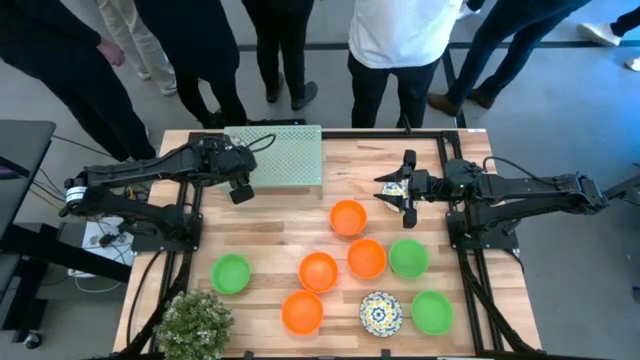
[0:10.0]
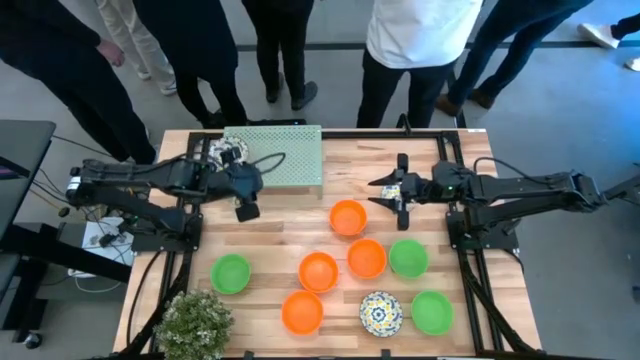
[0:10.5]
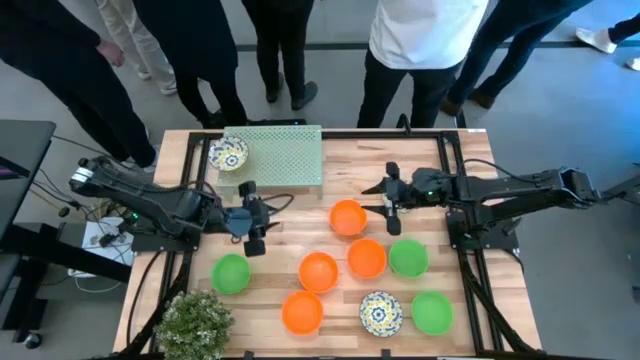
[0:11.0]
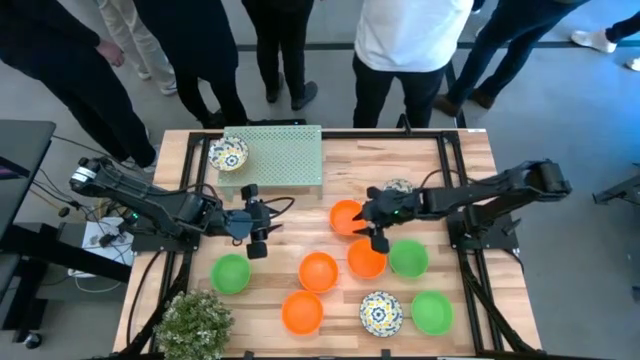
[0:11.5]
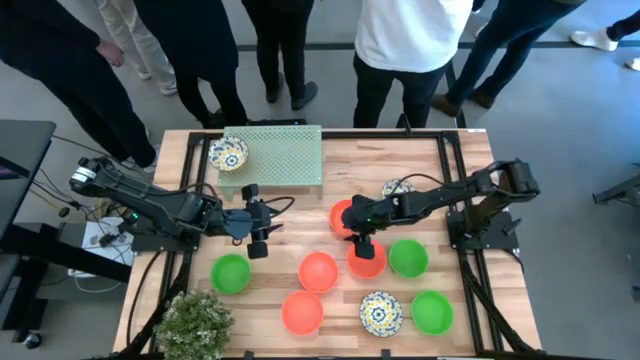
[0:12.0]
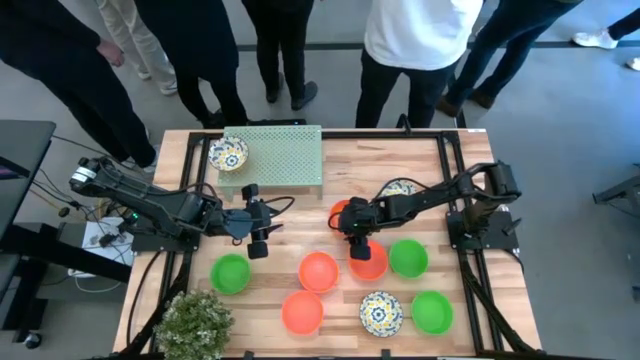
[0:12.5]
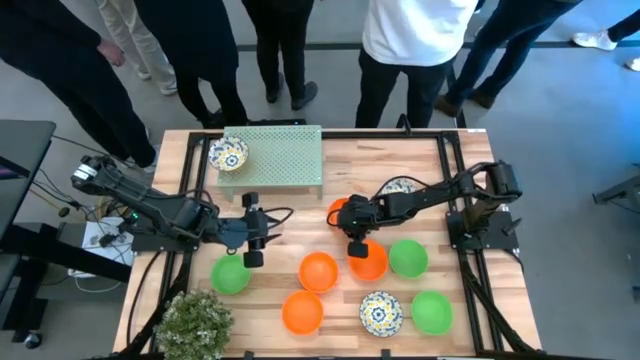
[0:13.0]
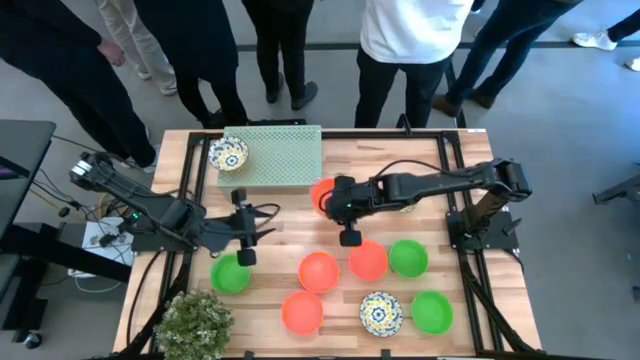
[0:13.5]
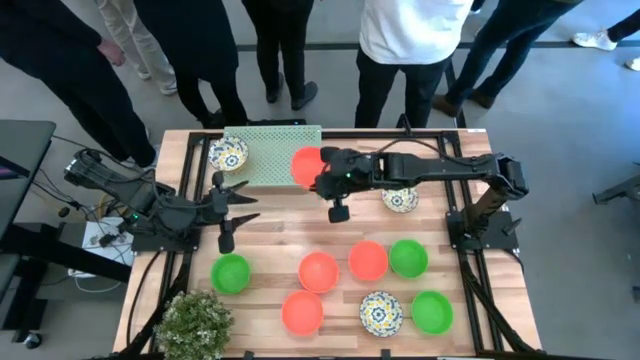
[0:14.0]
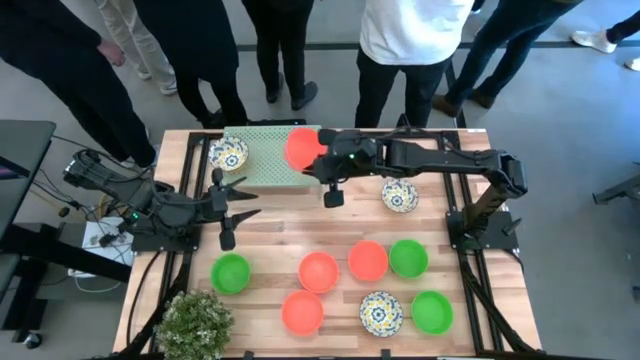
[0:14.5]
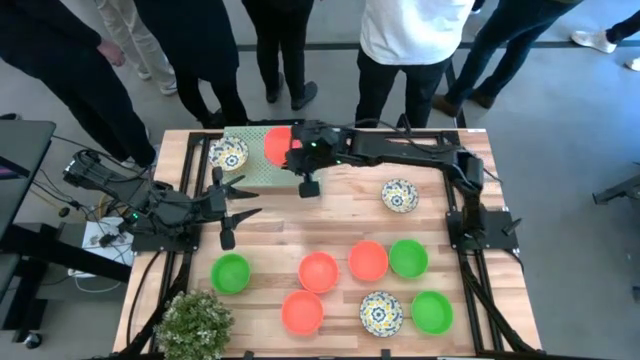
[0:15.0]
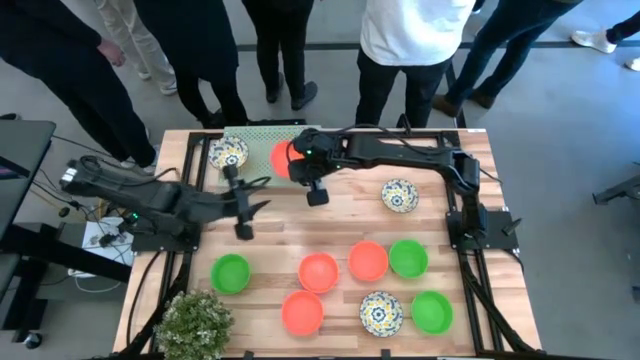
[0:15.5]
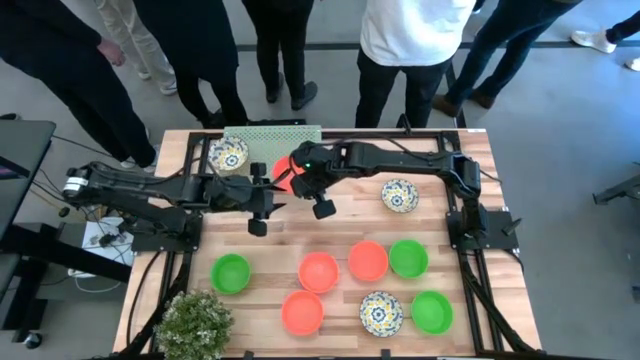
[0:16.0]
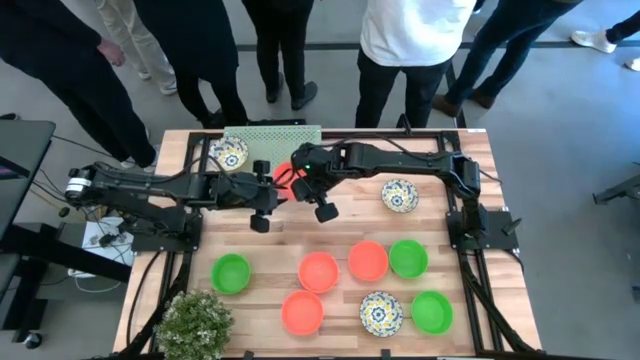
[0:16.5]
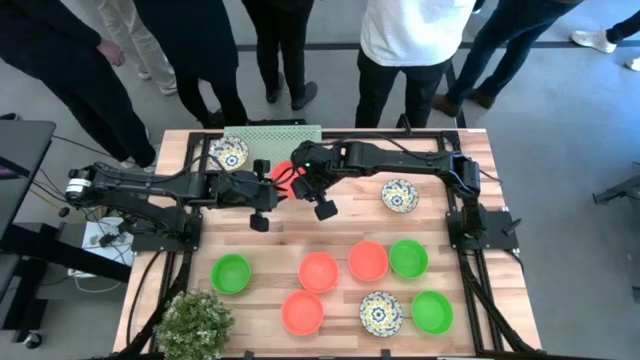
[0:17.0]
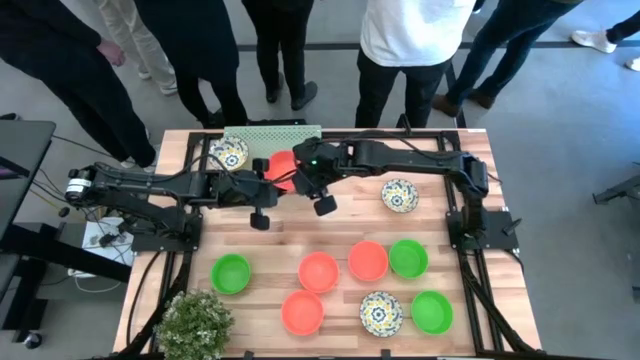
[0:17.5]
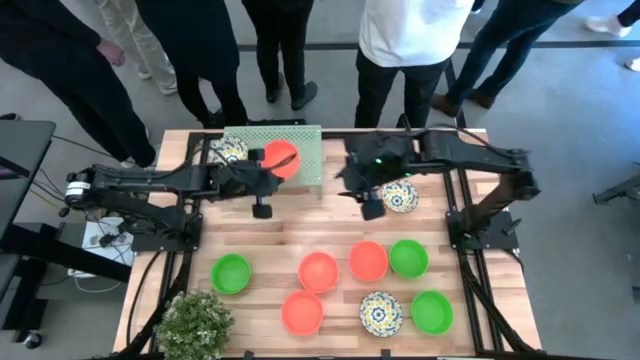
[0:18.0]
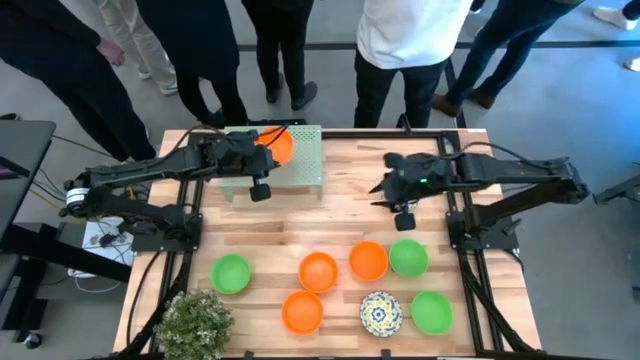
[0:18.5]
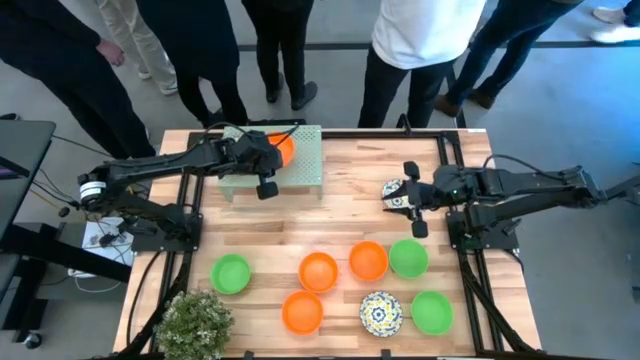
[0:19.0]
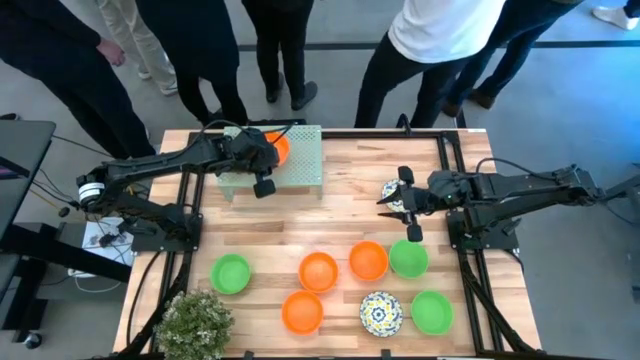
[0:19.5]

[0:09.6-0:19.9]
Task: Pick & Place Mini bowls
Put the orange bowl on the shelf

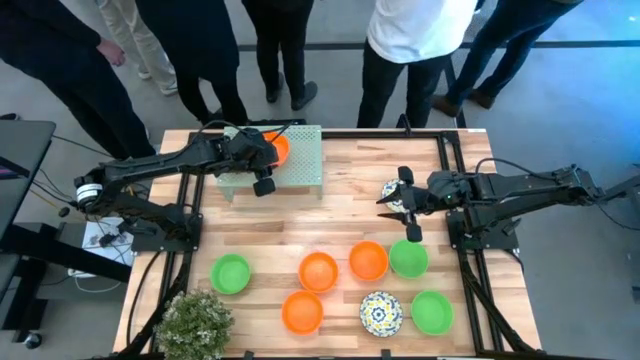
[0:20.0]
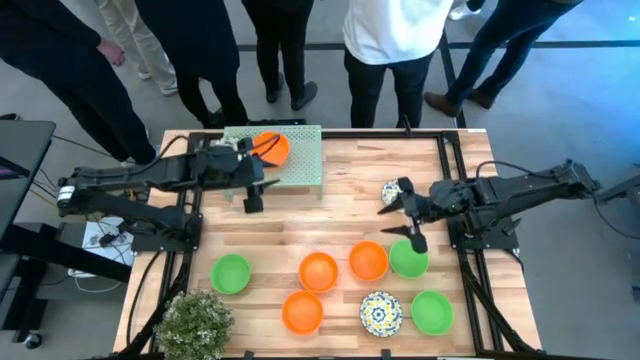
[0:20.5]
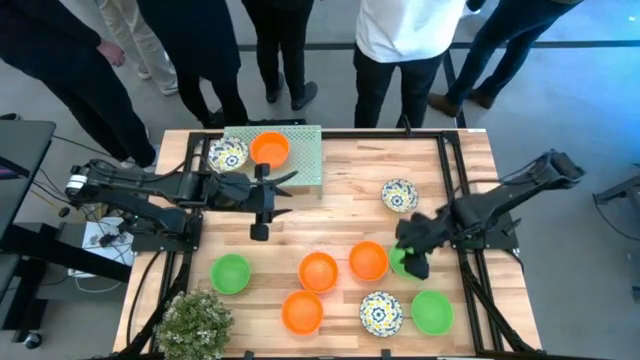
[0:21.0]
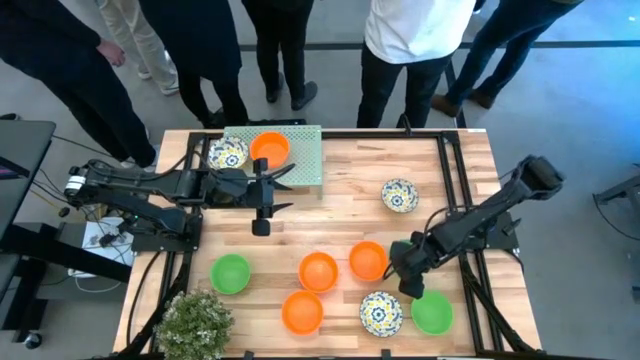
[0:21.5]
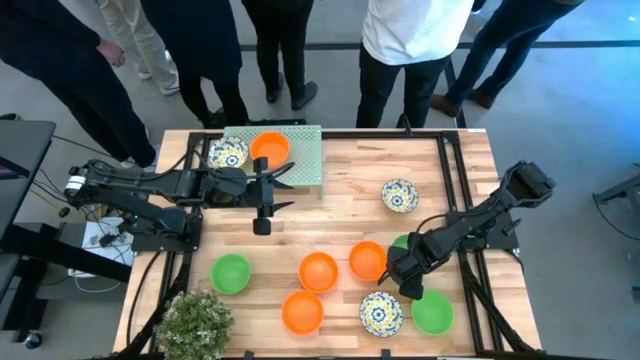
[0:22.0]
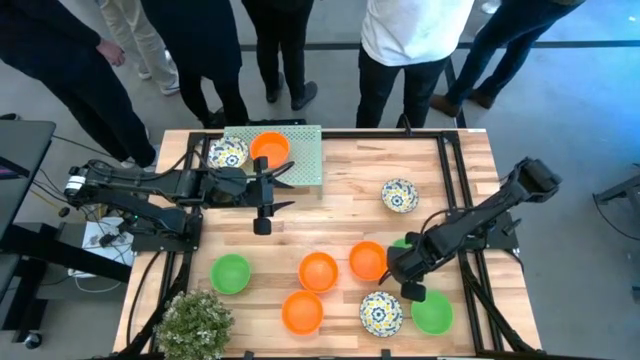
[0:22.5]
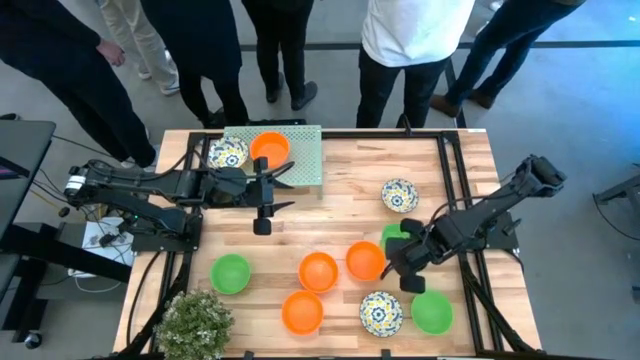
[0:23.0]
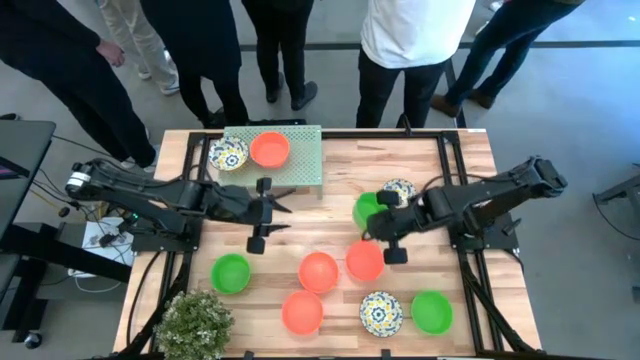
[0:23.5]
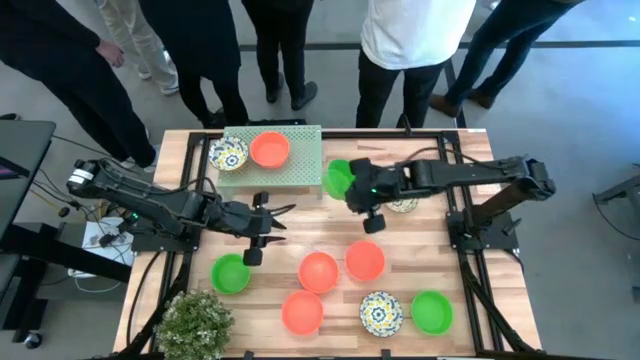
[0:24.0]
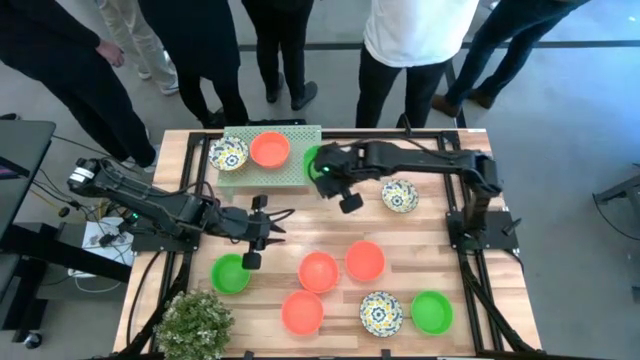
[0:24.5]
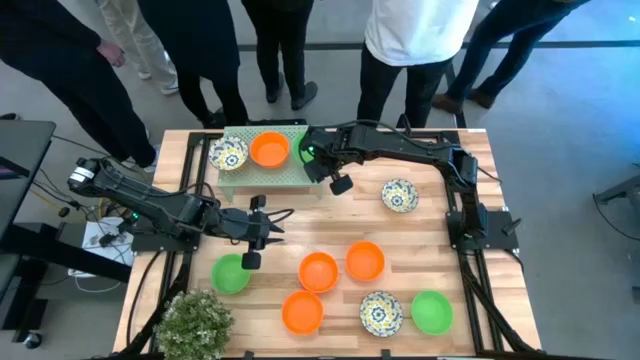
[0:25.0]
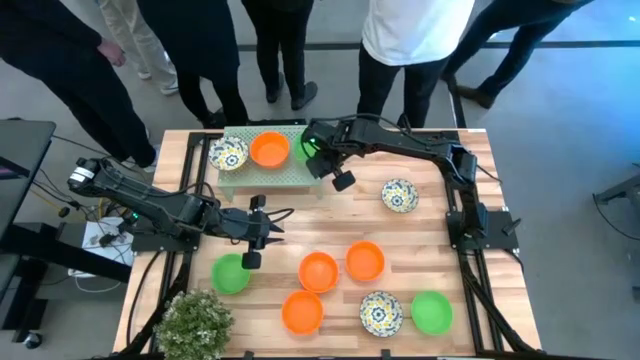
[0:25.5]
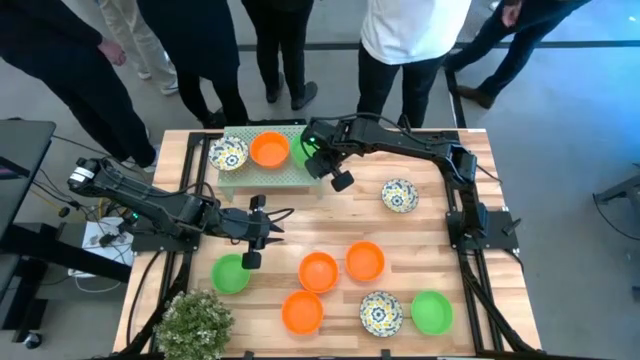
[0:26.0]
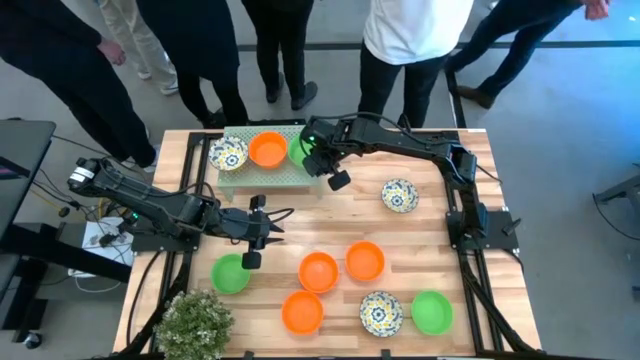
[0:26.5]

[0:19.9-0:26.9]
Put the green bowl on the shelf

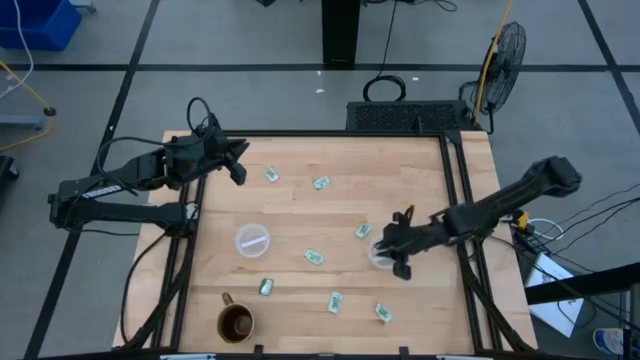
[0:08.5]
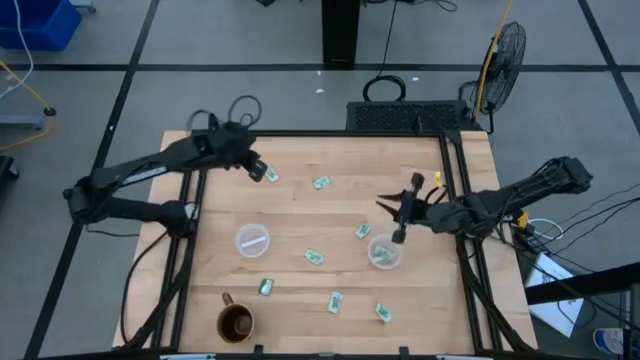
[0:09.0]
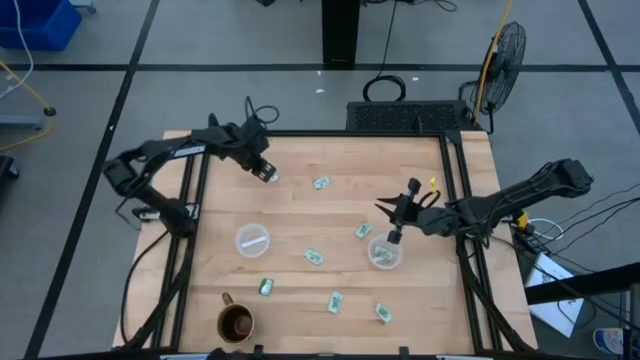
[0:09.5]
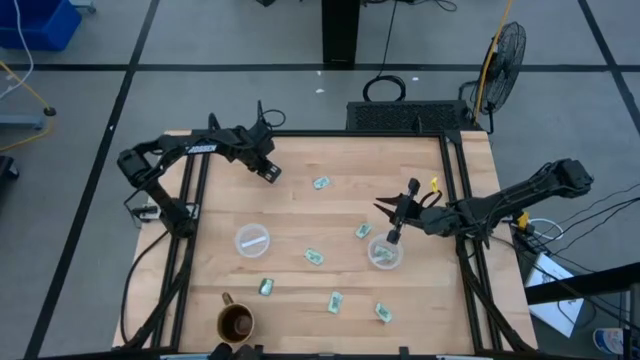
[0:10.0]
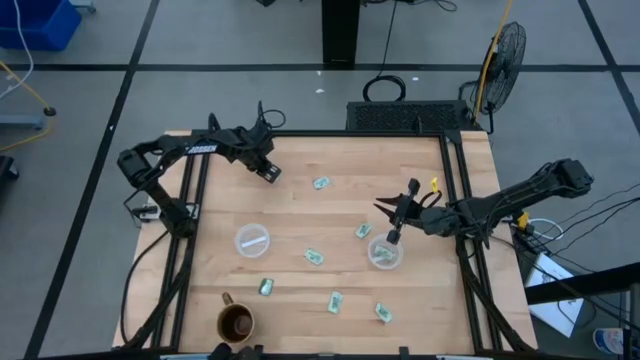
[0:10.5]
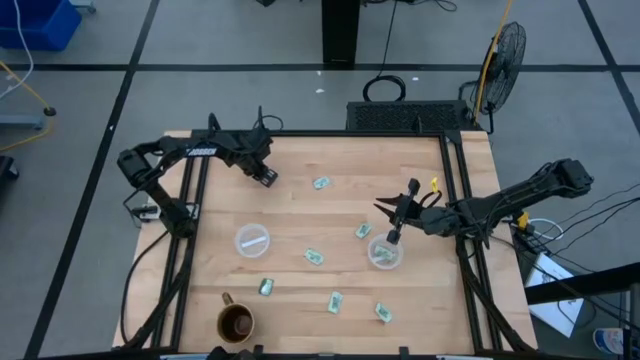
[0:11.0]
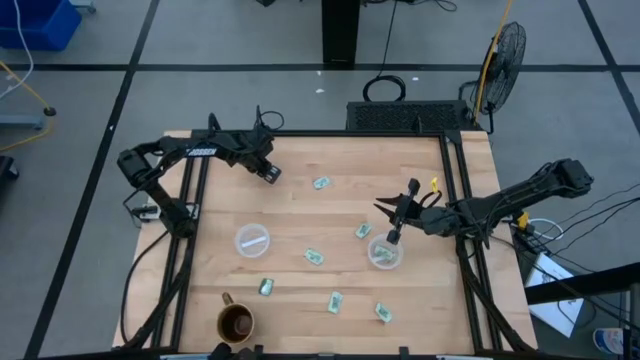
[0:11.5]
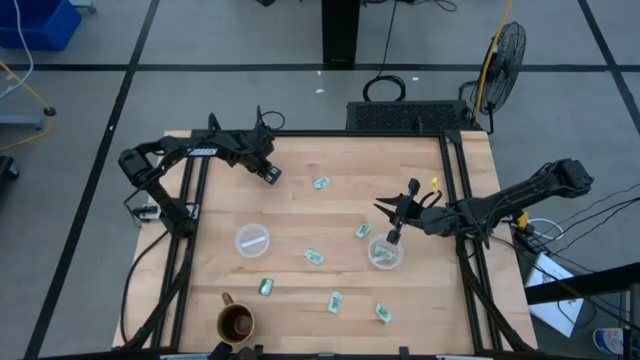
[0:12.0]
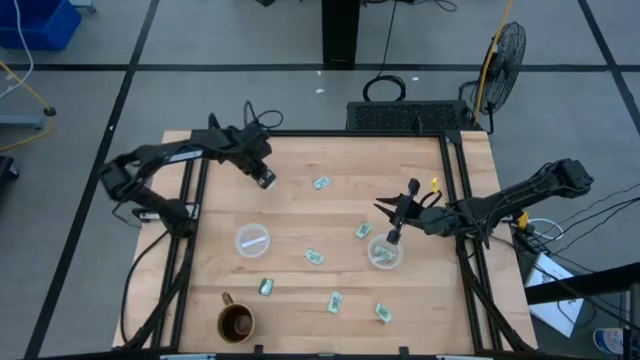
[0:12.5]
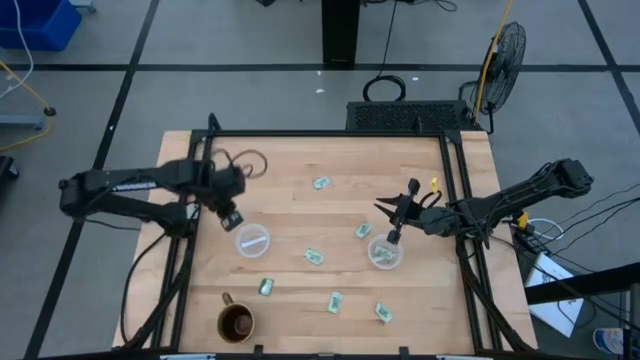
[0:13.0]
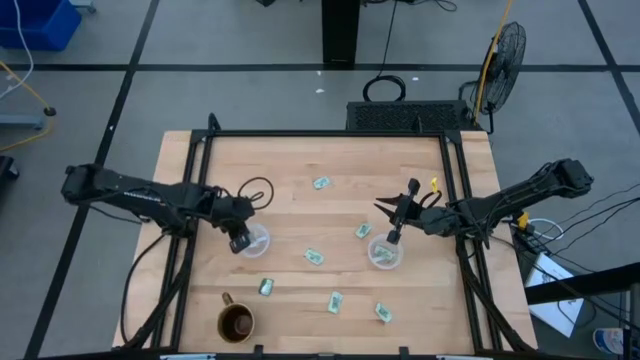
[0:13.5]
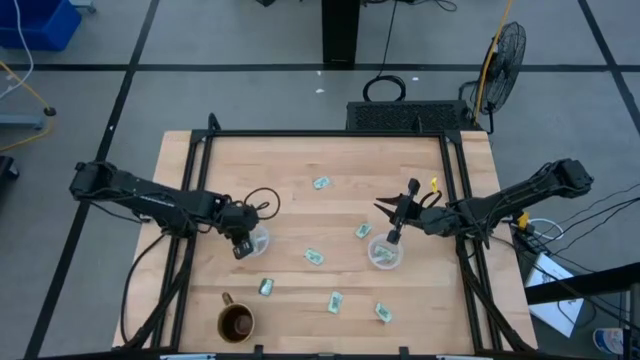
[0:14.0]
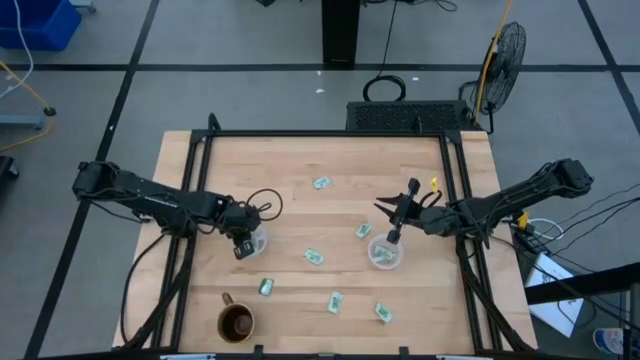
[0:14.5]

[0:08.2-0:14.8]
Task: Pick and place Stevia / Truvia into bins
Put the light green stevia packet into the left transparent container
